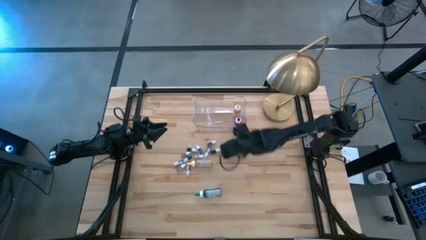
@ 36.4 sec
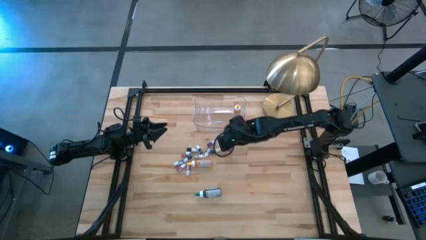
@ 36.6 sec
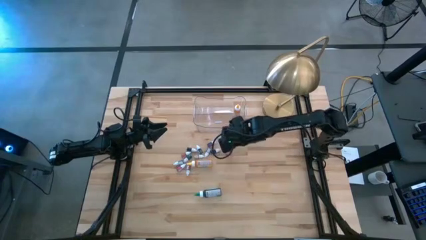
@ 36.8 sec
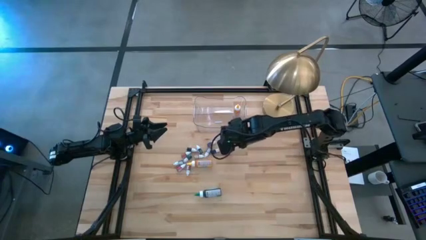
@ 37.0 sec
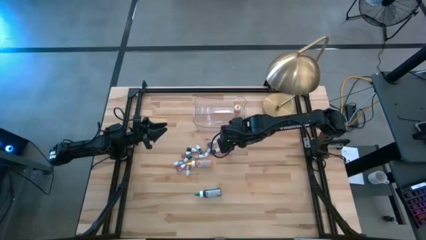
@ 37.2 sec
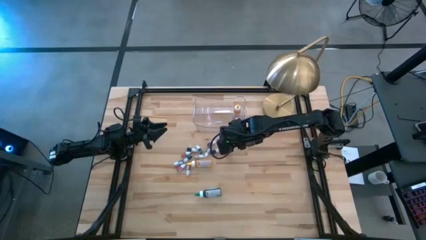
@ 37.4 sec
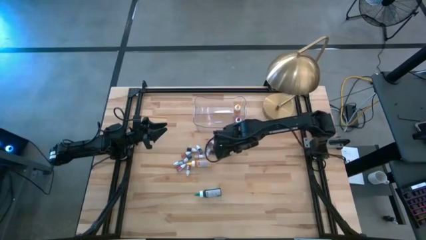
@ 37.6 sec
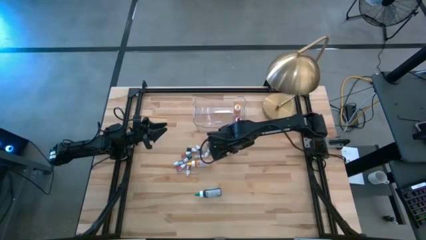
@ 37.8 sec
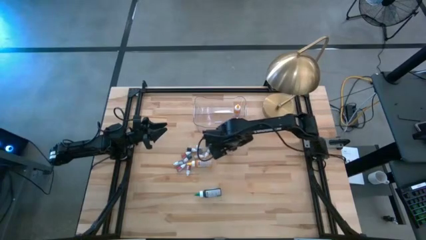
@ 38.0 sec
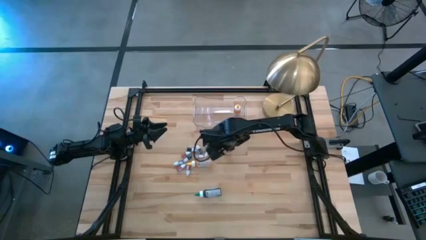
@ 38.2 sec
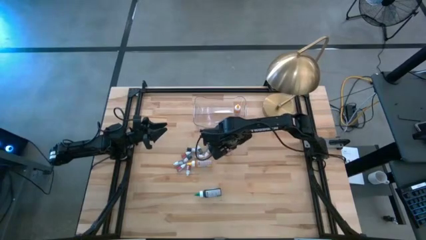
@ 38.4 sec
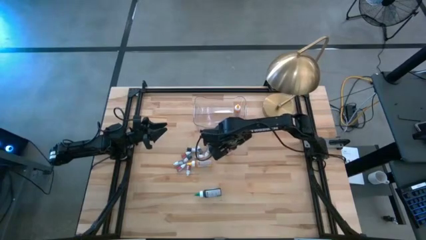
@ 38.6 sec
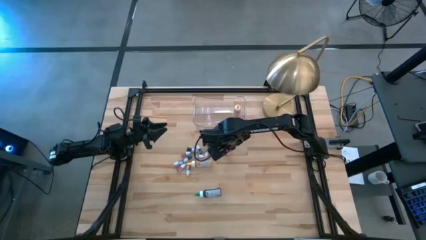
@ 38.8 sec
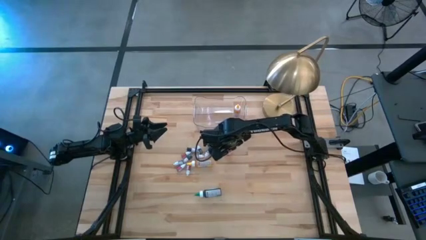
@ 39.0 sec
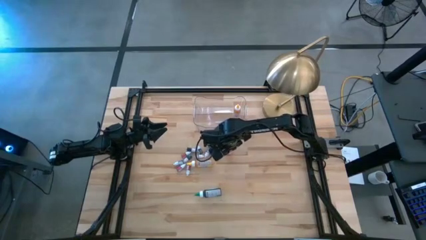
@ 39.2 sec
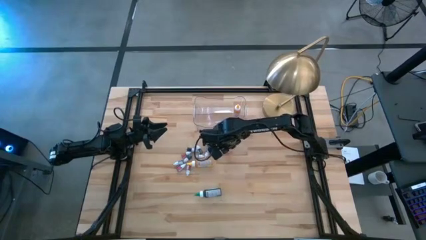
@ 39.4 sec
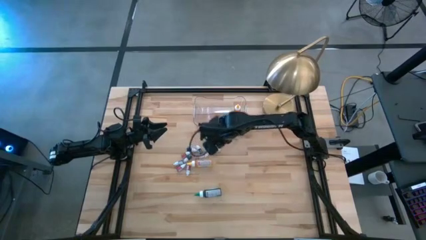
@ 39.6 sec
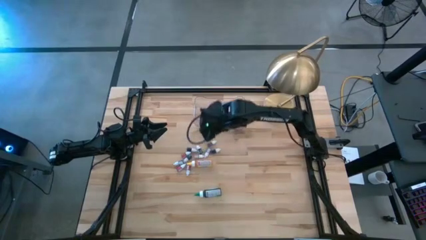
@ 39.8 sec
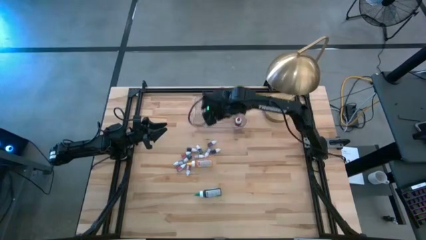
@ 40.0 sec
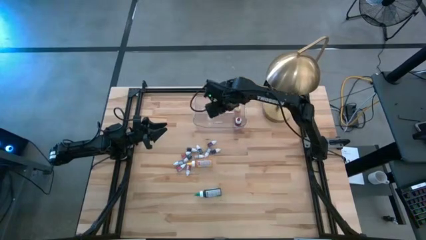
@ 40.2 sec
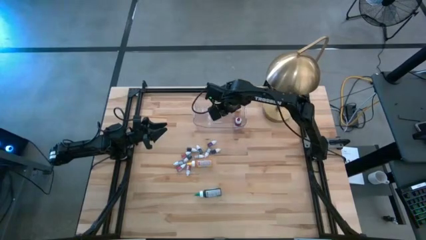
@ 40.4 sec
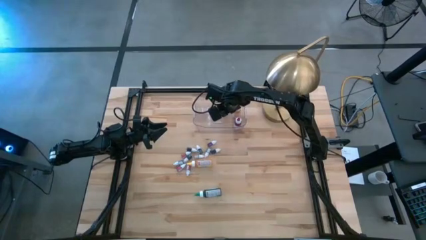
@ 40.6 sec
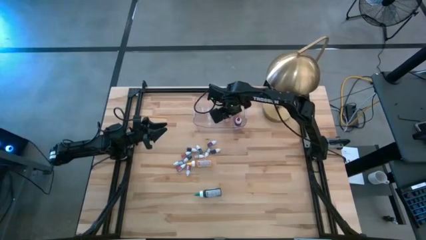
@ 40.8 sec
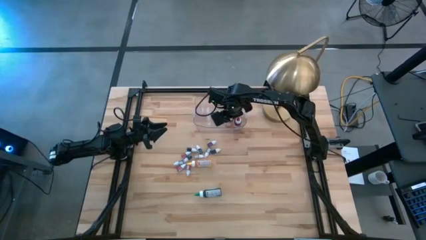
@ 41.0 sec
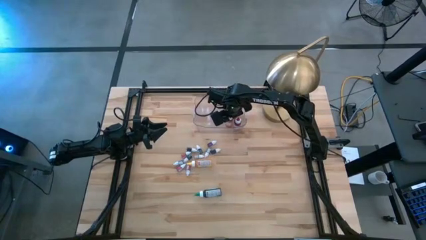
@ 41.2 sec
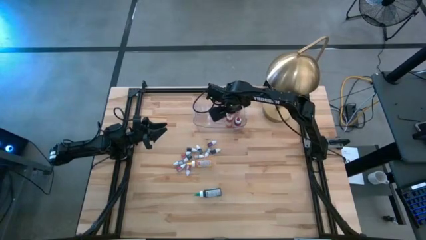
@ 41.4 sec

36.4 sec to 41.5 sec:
Task: Pick & Place food coloring
Put the big orange food coloring bottle into the transparent bin

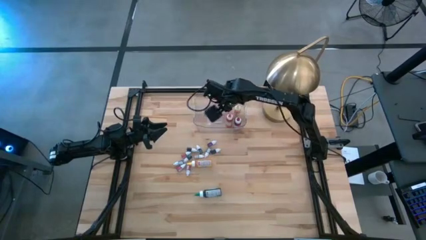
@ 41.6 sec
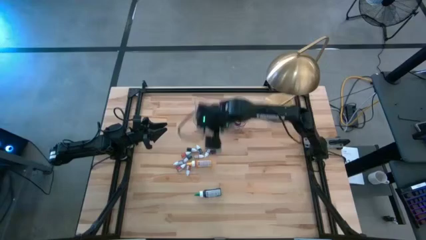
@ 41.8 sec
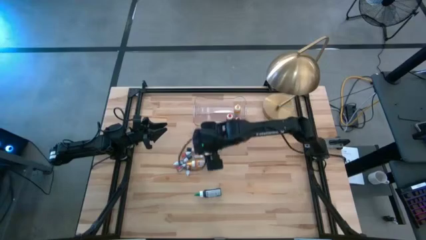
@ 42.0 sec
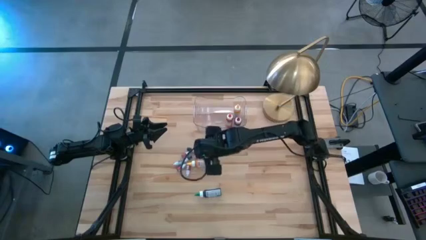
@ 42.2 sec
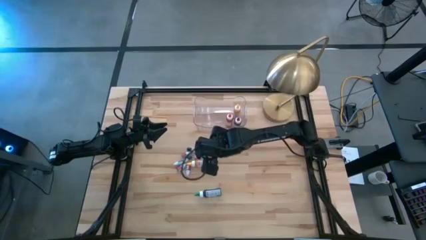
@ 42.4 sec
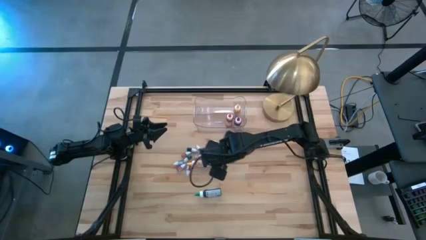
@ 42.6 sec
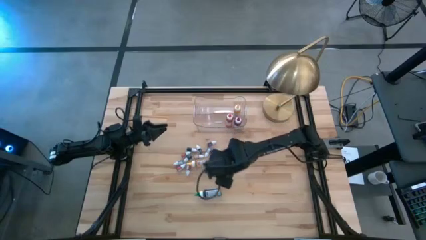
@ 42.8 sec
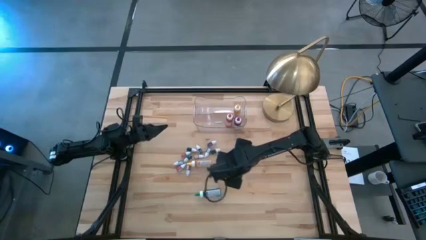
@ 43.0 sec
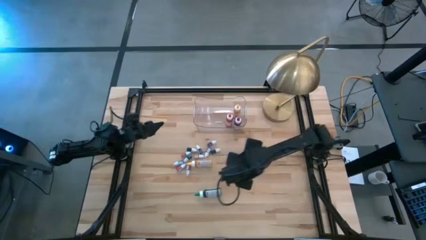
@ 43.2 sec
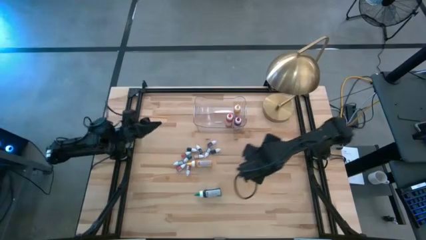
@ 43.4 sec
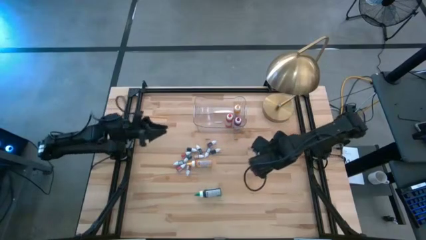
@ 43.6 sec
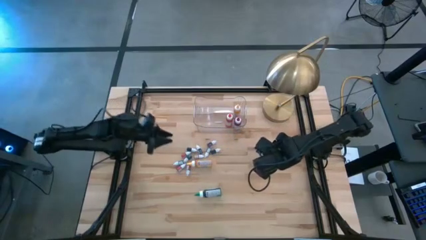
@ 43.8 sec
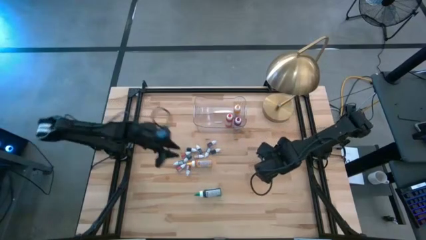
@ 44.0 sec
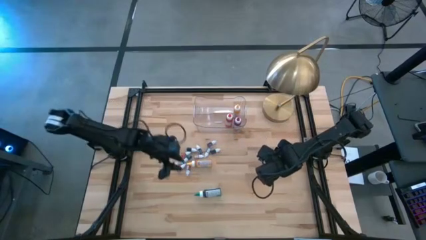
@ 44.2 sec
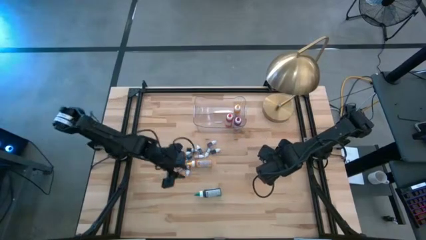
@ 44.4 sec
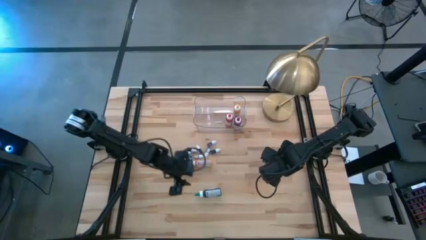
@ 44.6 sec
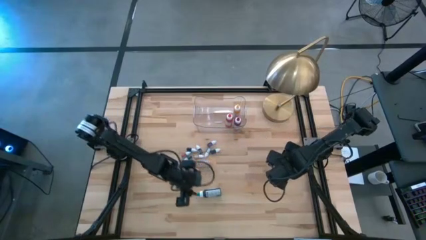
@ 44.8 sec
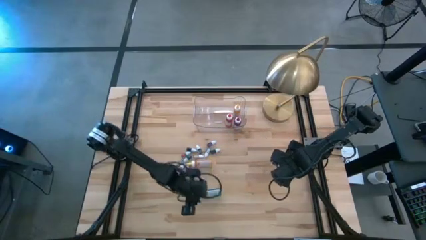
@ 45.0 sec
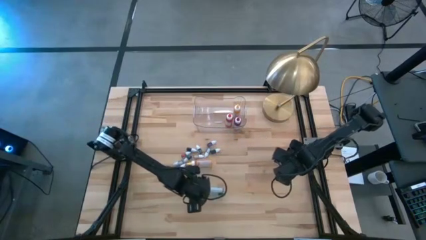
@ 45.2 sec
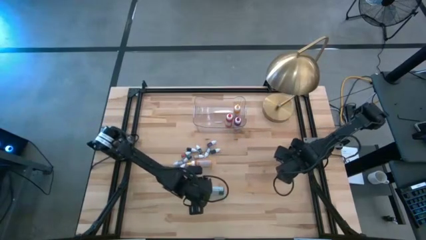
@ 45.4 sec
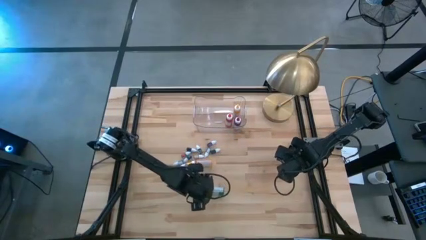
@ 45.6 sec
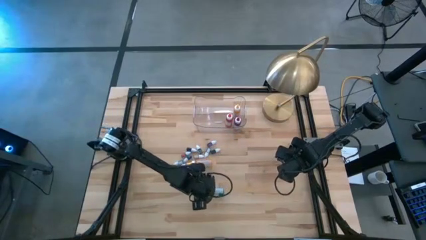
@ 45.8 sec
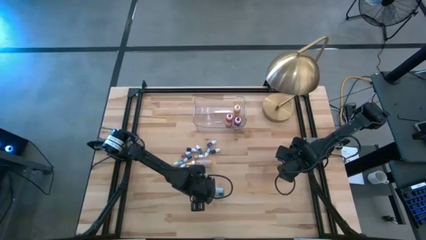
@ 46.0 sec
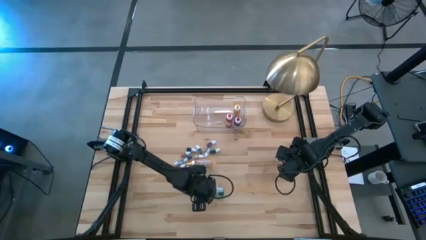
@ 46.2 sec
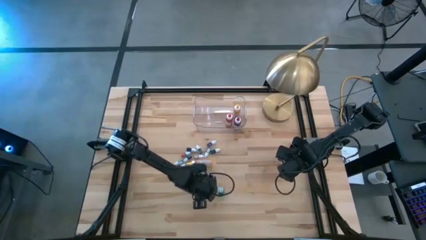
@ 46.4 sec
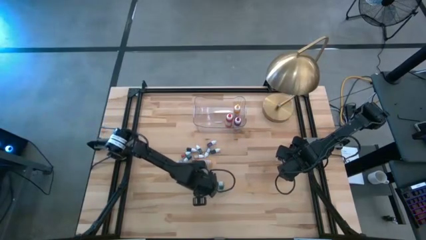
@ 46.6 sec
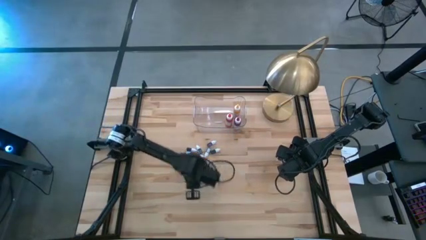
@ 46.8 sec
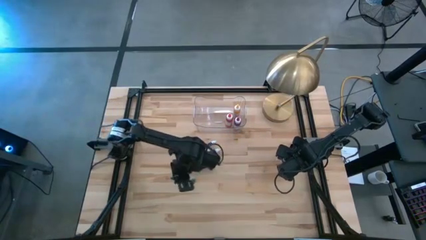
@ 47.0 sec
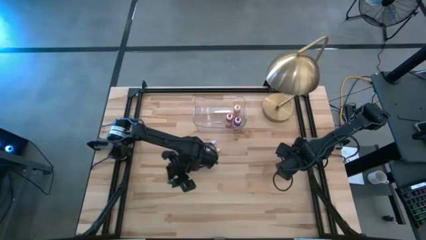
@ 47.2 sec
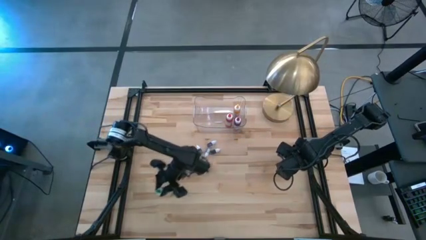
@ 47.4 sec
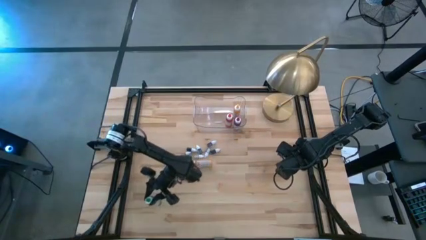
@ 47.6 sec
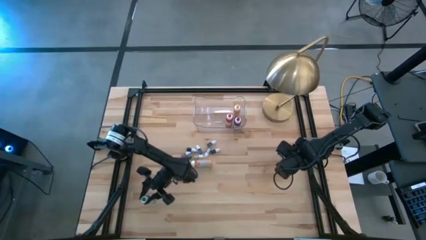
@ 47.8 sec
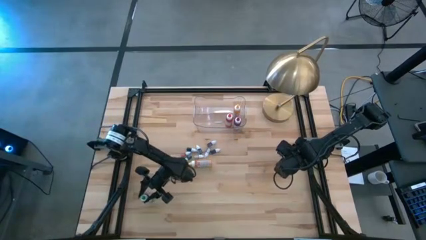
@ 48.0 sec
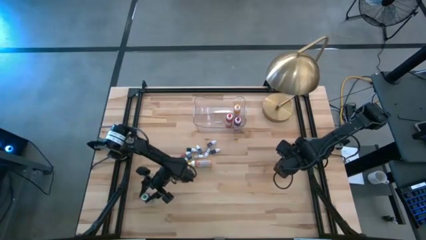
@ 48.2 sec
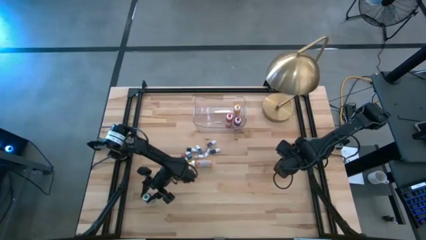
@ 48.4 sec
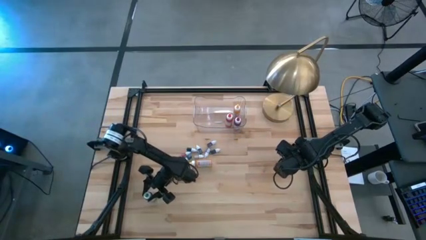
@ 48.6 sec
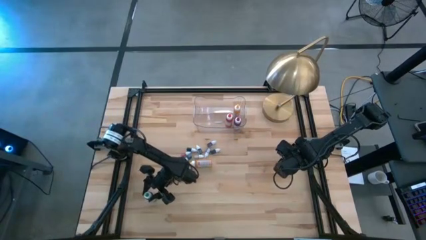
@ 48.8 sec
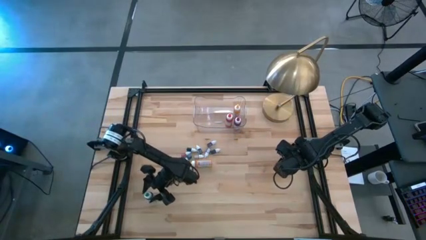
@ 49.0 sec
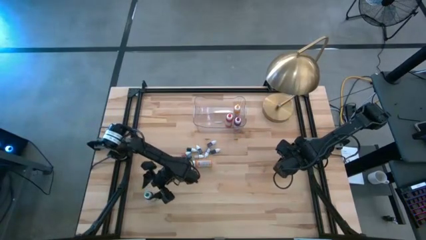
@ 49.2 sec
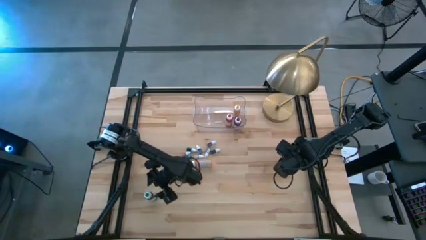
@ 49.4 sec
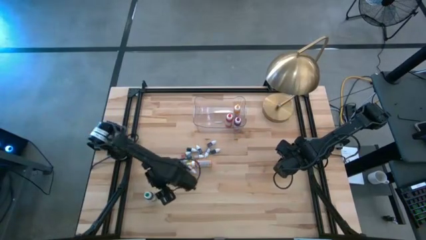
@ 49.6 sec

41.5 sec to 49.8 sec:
Move the big green food coloring bottle to the middle left of the table

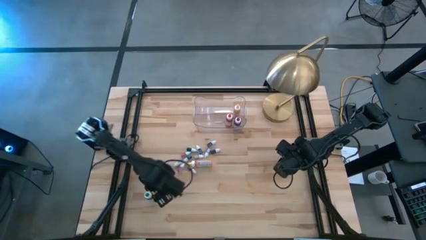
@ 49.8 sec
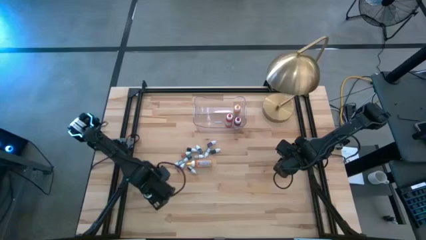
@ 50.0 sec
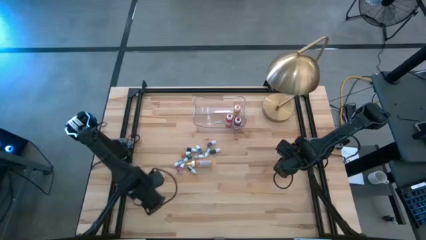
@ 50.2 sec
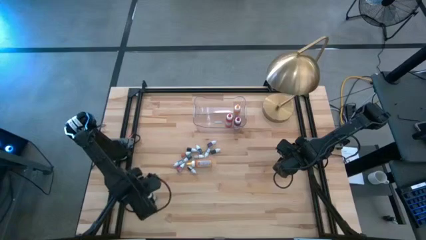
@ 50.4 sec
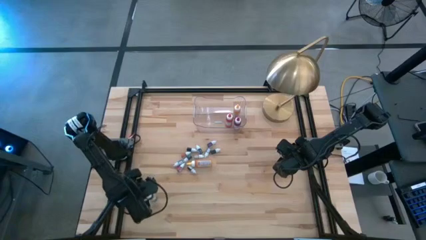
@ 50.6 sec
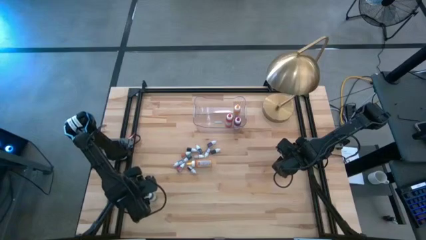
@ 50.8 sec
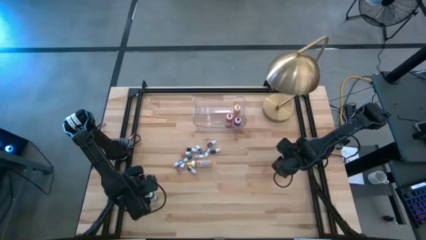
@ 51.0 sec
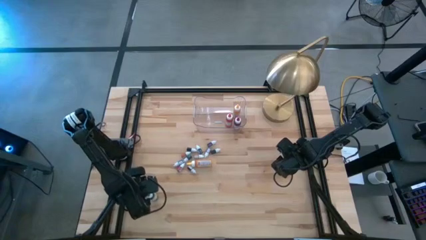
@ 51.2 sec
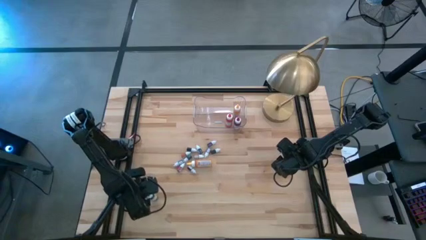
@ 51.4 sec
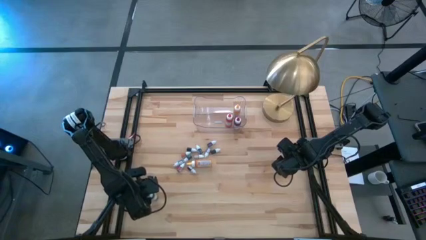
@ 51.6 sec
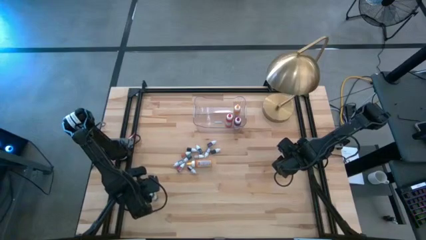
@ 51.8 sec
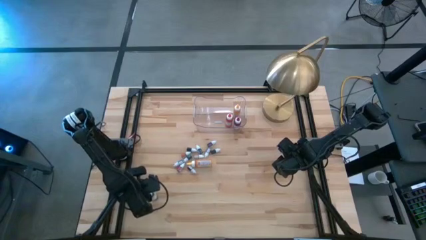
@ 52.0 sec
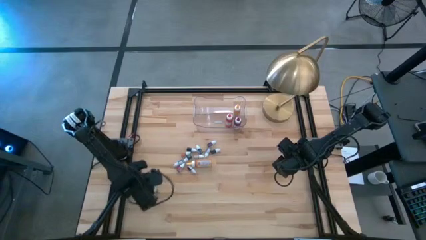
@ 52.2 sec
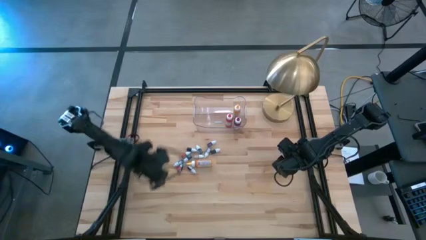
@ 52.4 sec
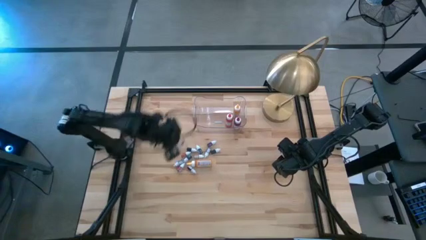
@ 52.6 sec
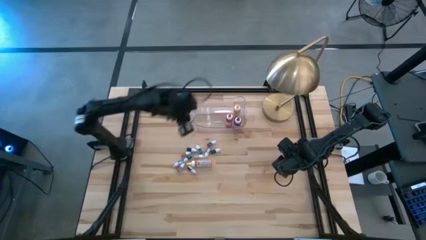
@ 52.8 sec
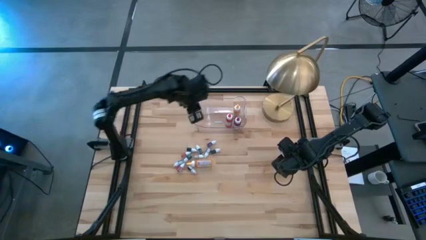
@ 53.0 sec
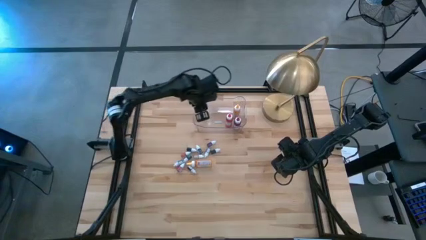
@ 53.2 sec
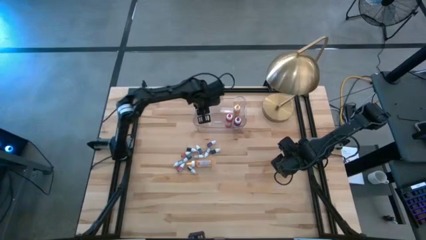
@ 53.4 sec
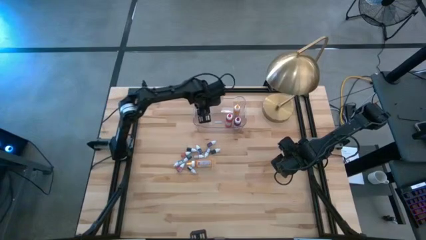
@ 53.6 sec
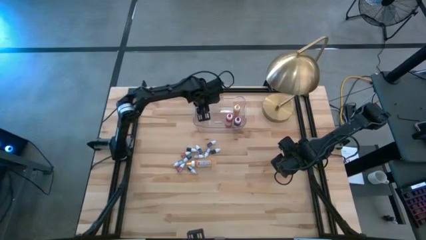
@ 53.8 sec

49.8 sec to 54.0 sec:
Put the big green food coloring bottle into the transparent bin
